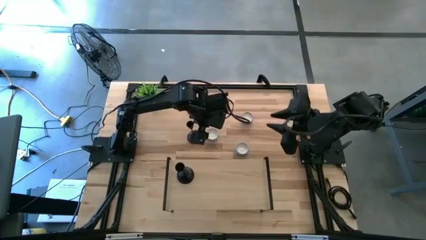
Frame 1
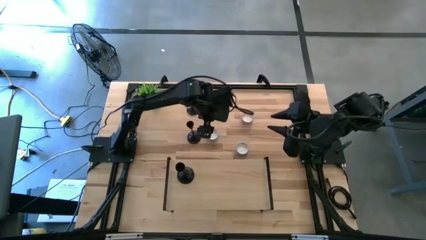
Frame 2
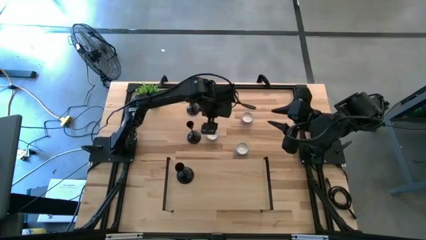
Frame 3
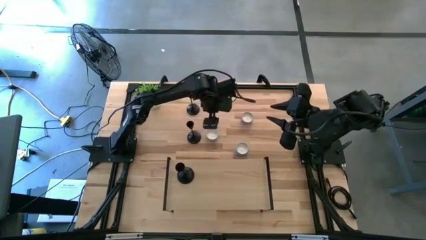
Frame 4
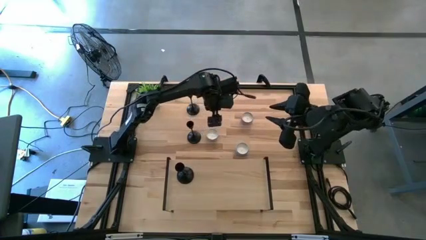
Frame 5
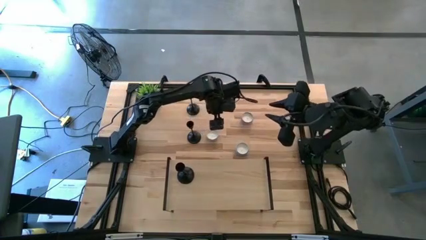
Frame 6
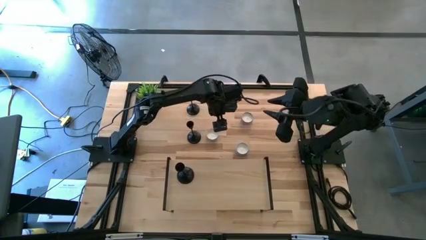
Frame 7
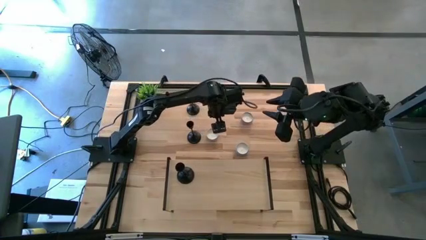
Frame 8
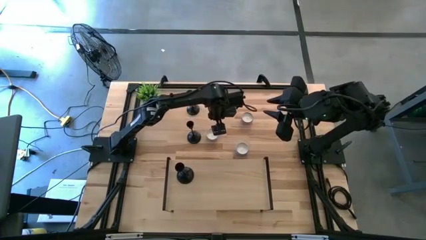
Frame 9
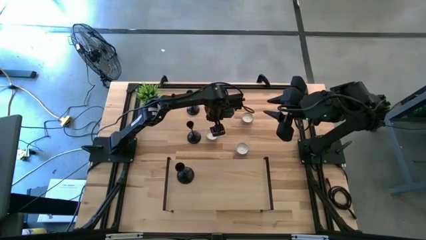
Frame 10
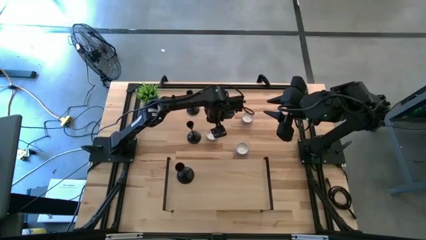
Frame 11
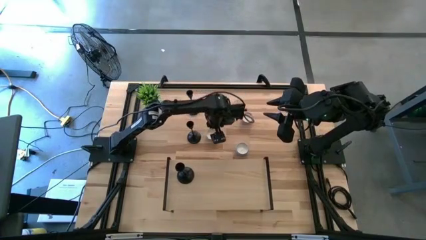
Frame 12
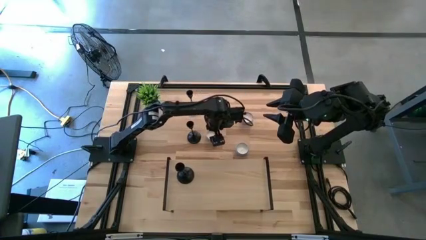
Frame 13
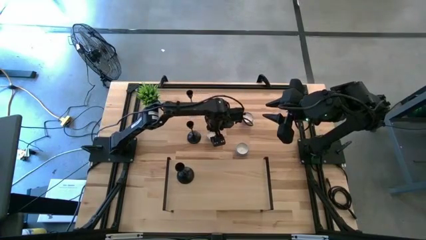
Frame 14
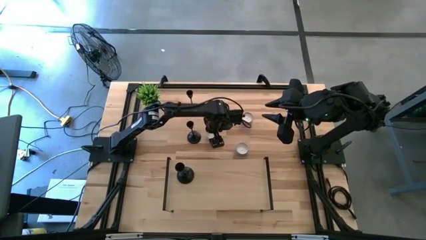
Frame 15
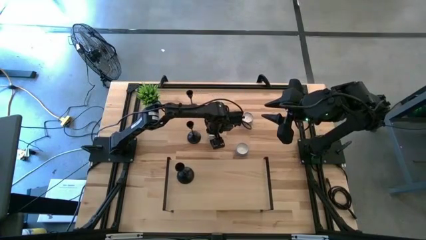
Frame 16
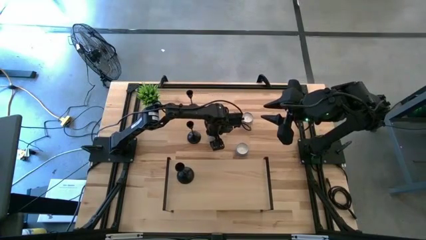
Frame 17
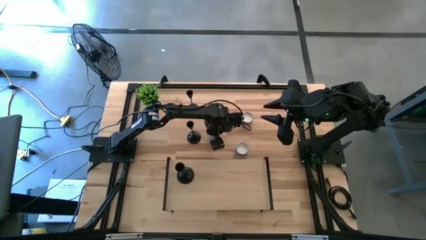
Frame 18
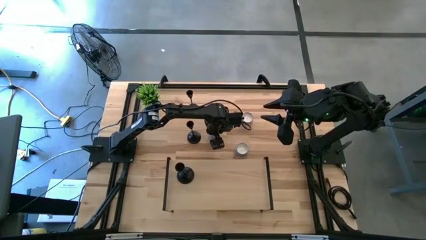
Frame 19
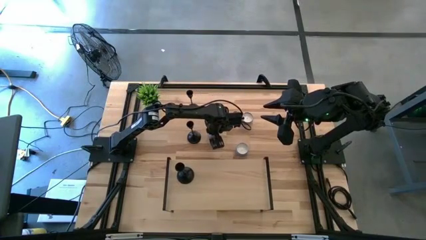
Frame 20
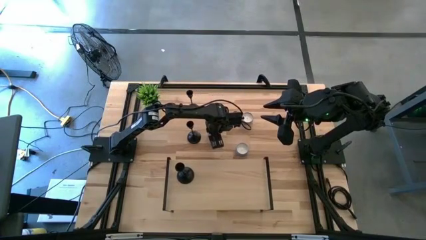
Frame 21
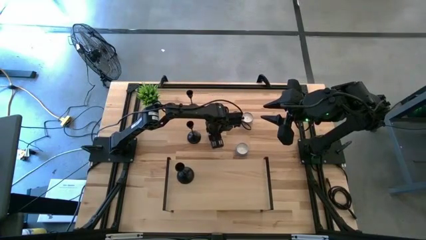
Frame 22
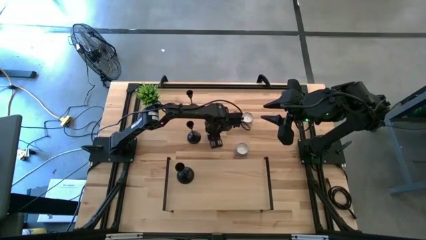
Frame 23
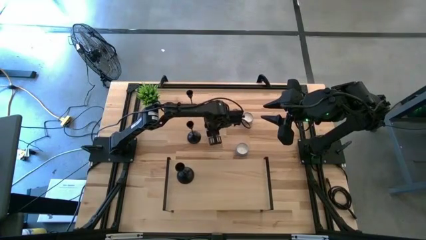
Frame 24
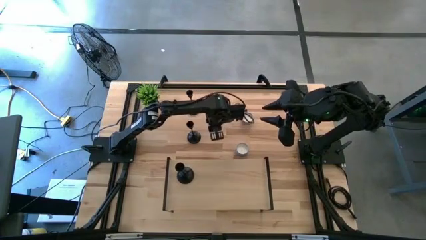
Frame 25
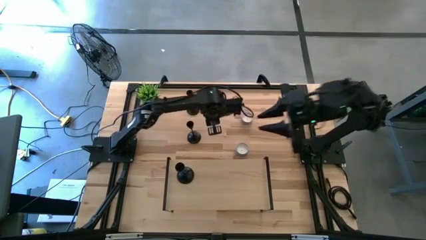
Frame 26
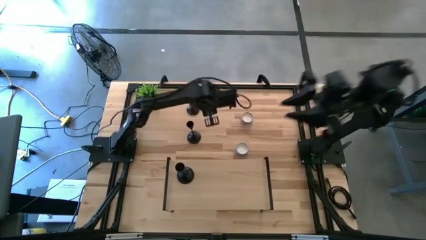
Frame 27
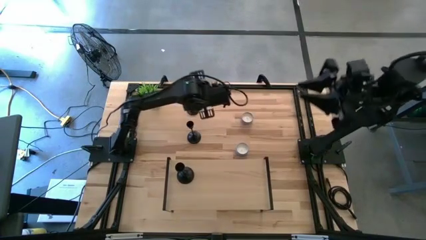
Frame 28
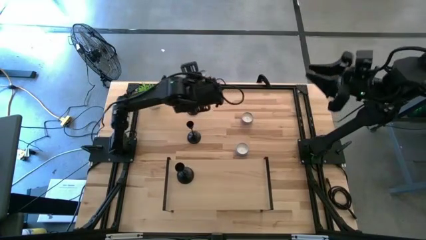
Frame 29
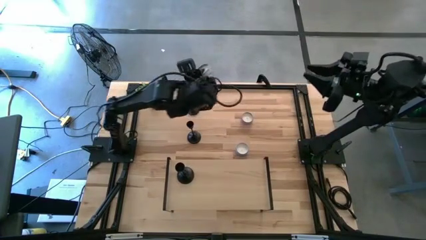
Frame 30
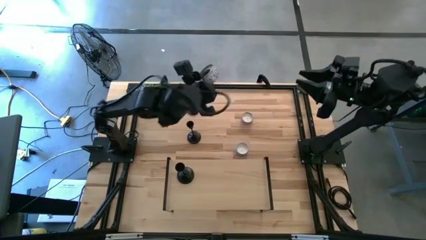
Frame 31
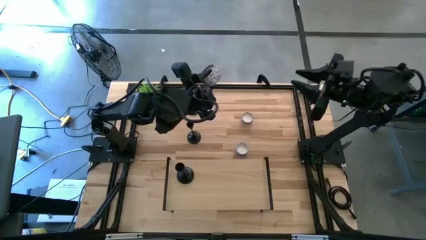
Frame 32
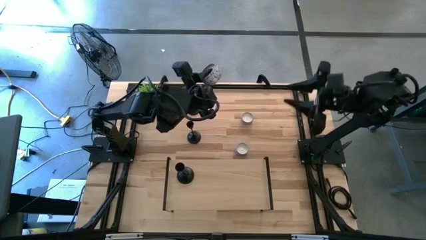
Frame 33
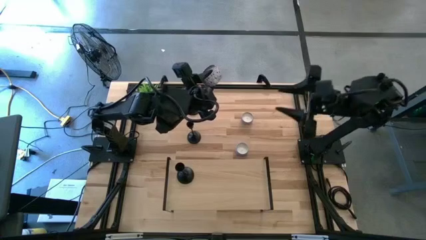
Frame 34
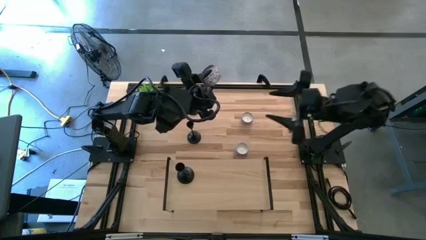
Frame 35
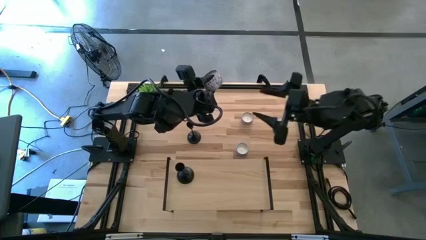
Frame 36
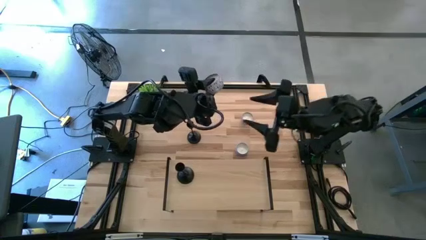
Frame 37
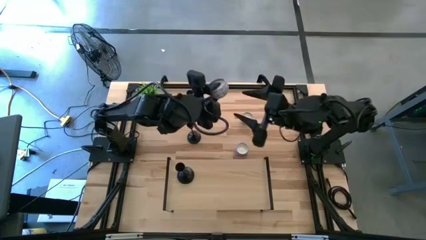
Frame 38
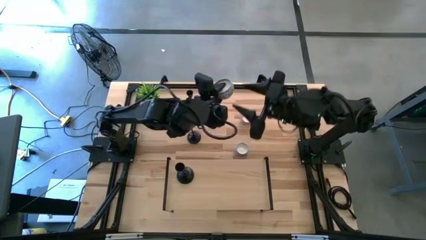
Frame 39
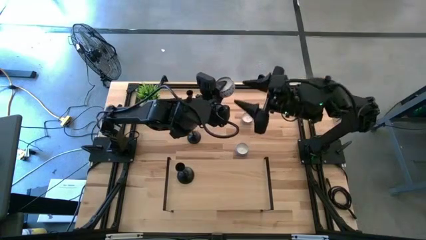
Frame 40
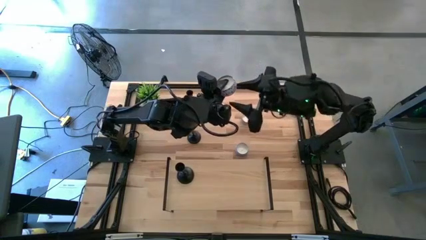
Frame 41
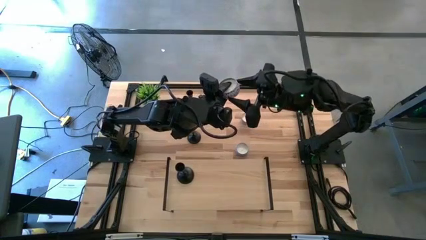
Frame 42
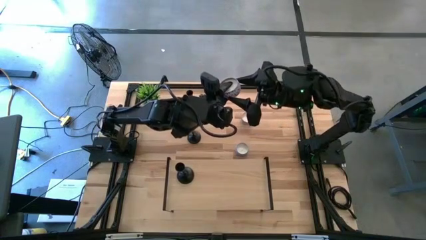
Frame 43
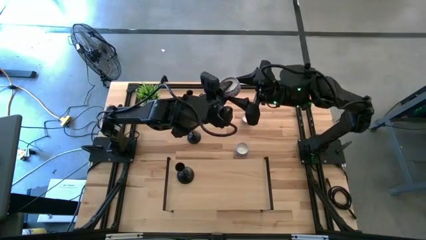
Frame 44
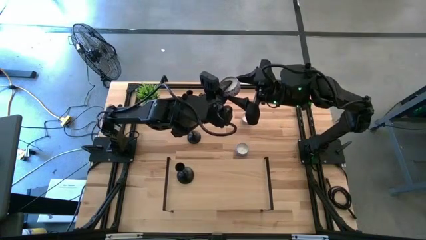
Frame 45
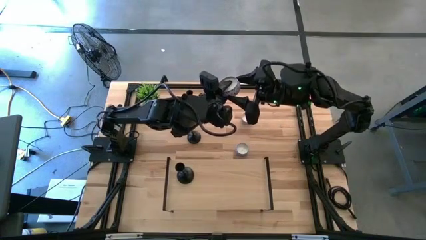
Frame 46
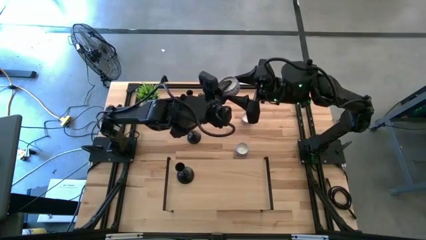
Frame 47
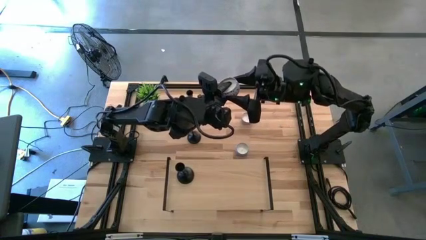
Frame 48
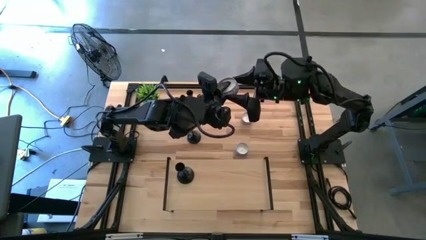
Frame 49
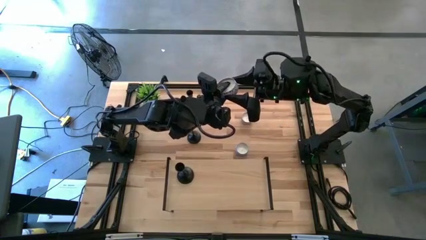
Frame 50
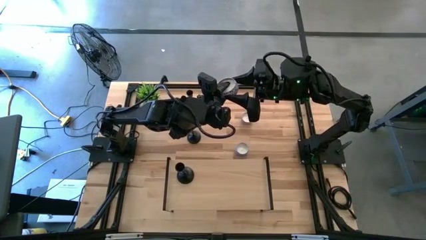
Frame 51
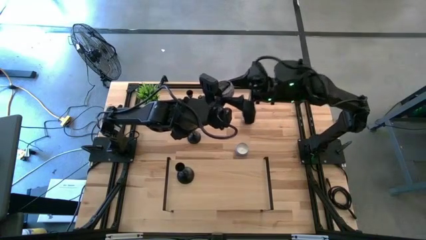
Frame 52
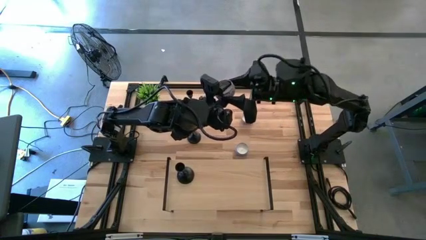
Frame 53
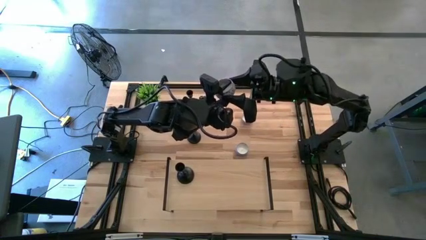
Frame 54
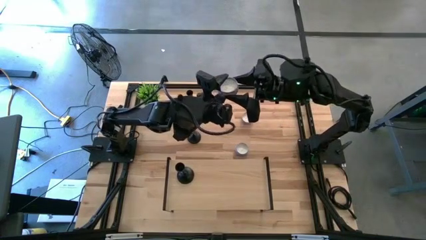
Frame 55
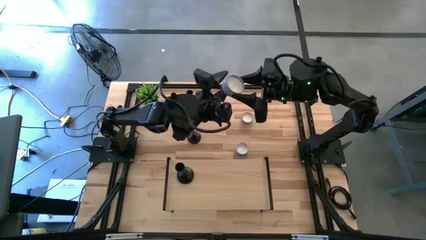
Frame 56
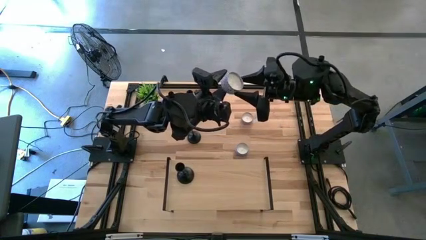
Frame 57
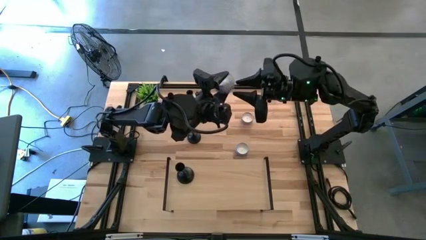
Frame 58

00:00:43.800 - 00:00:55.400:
Task: Pick & Place candle stick holders
Put the red scented candle on the shelf
